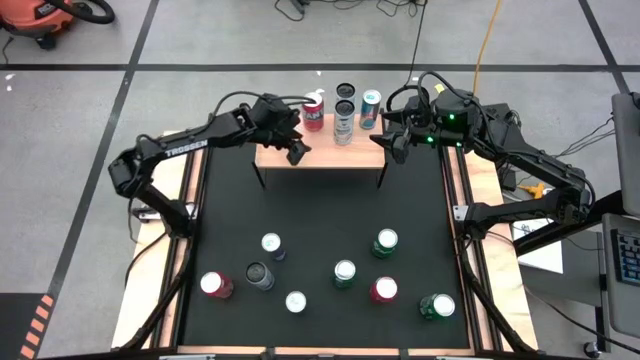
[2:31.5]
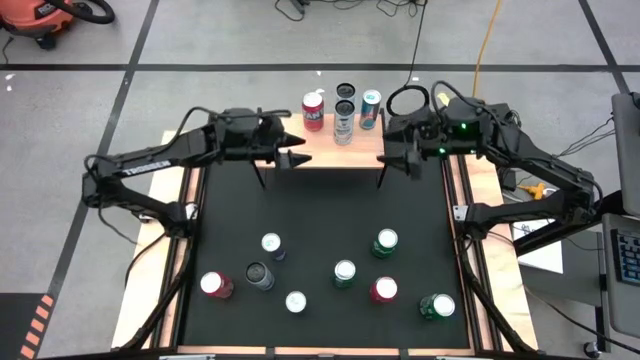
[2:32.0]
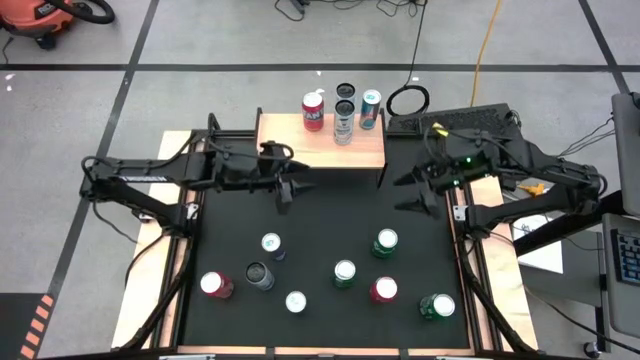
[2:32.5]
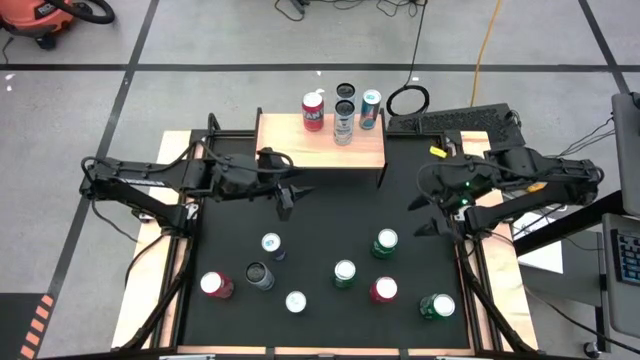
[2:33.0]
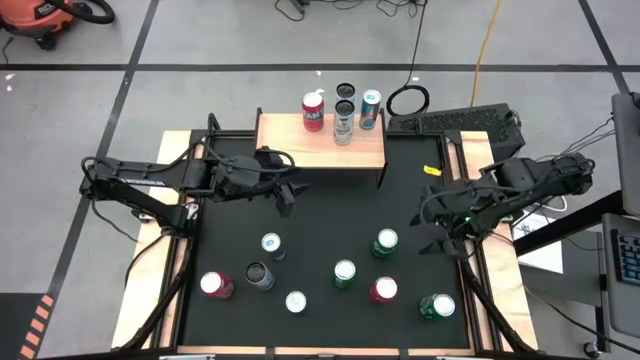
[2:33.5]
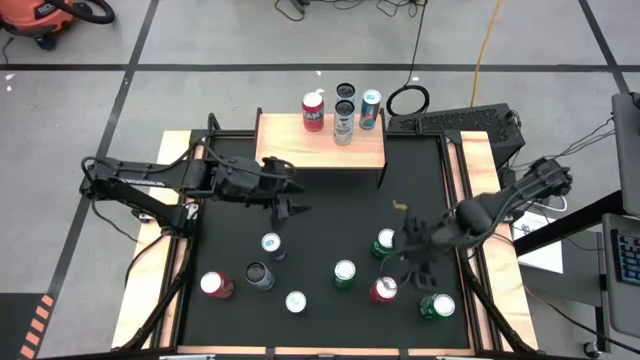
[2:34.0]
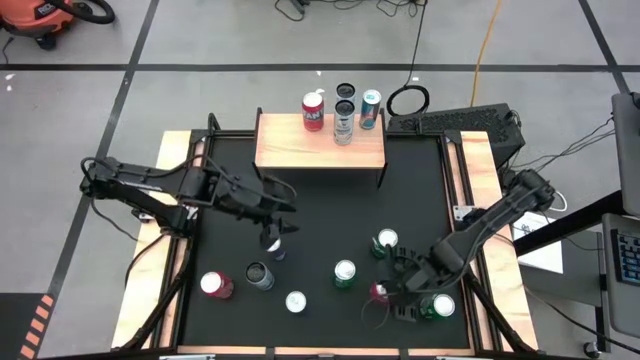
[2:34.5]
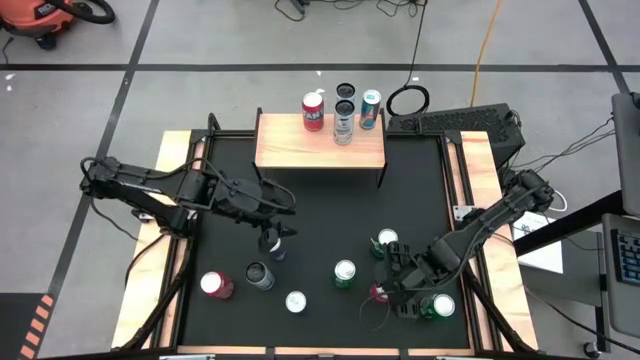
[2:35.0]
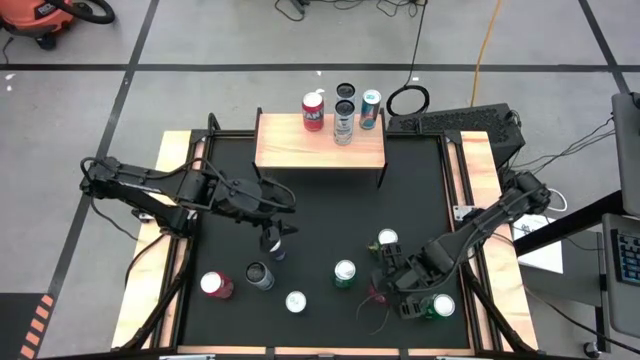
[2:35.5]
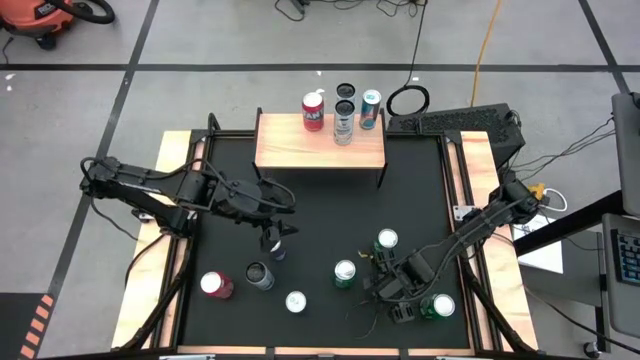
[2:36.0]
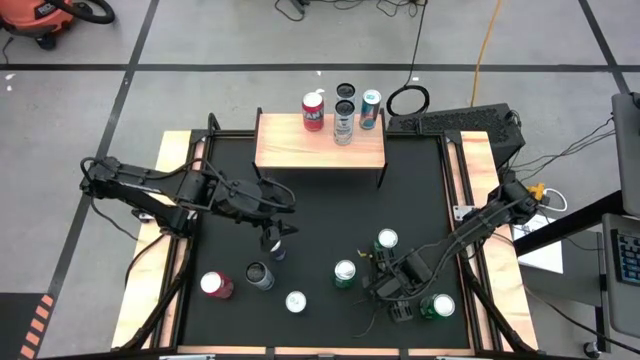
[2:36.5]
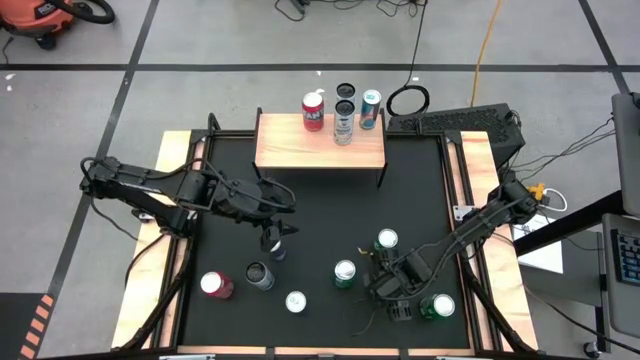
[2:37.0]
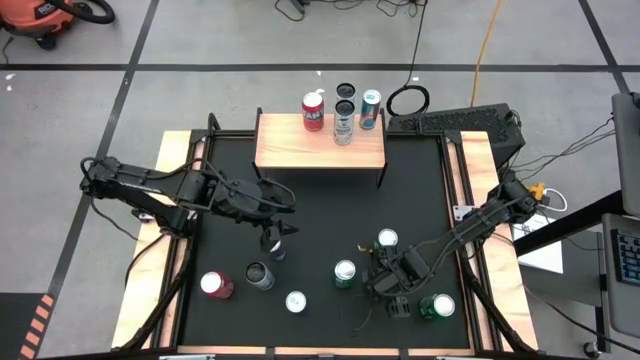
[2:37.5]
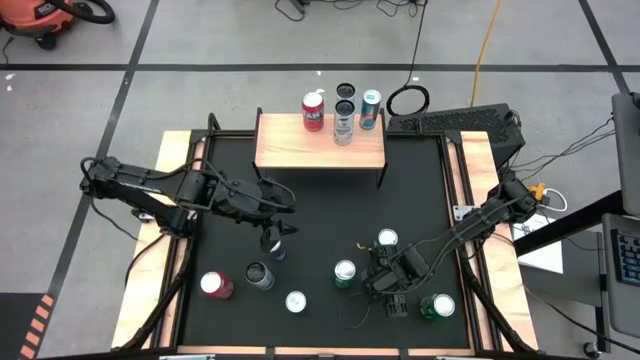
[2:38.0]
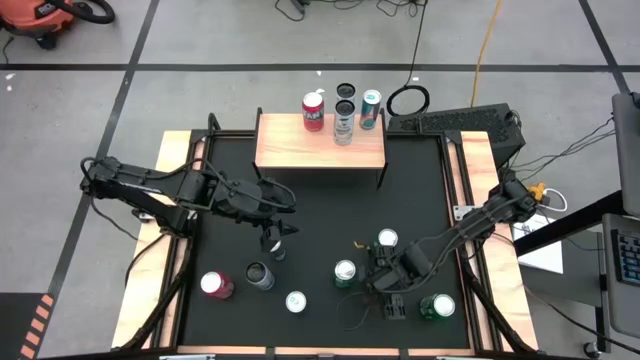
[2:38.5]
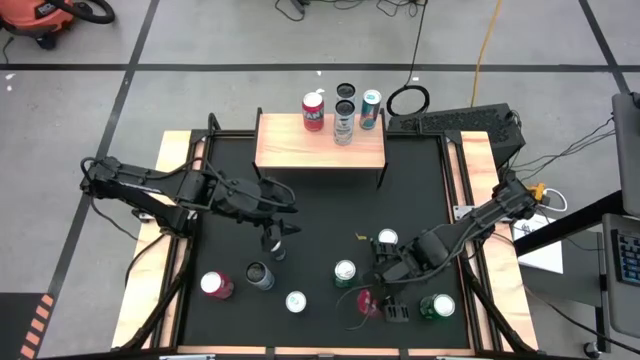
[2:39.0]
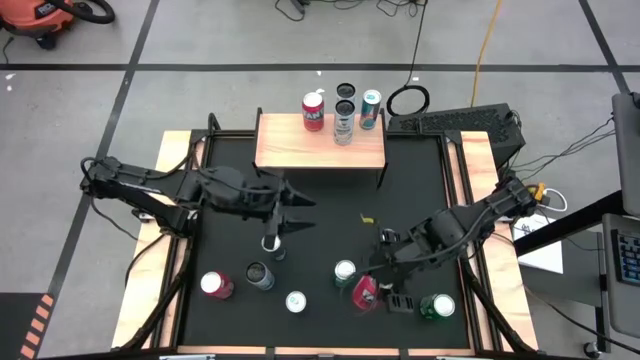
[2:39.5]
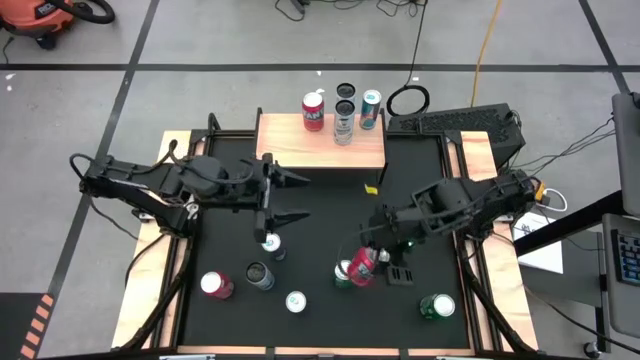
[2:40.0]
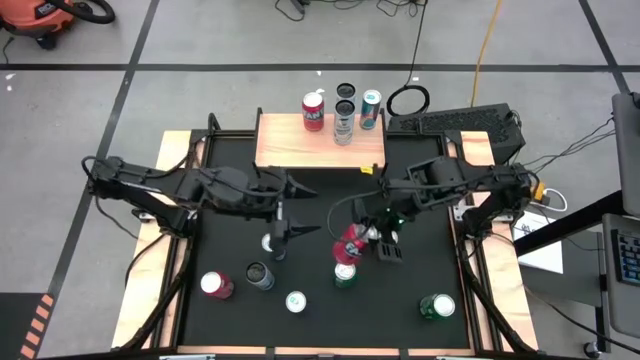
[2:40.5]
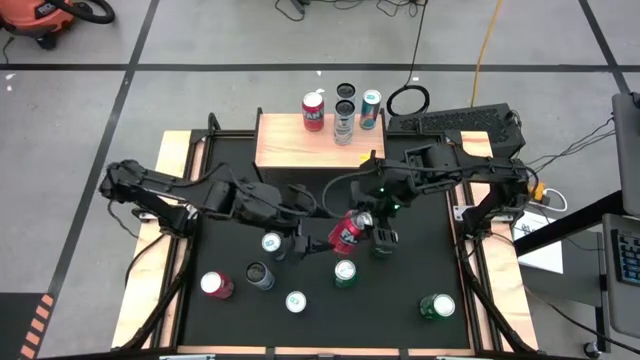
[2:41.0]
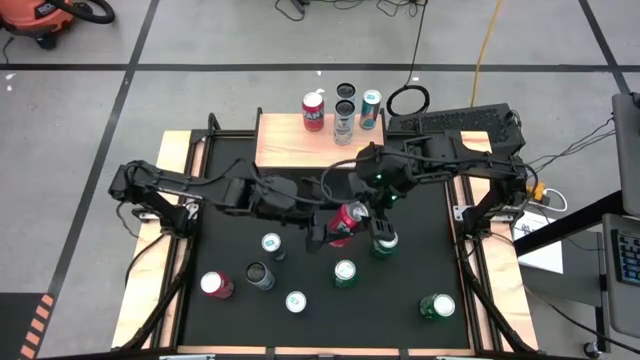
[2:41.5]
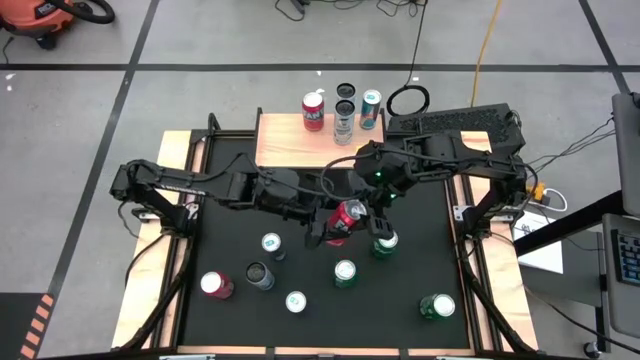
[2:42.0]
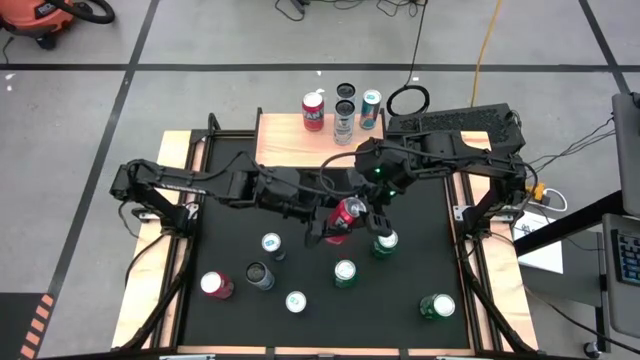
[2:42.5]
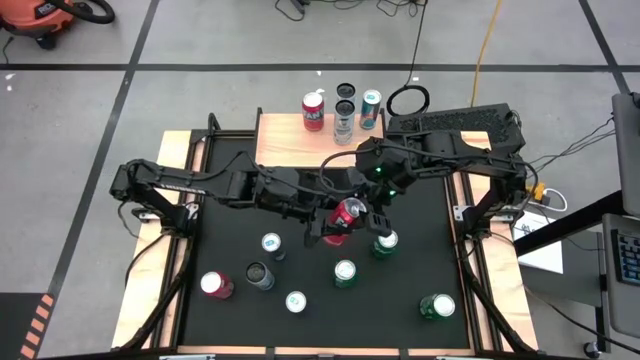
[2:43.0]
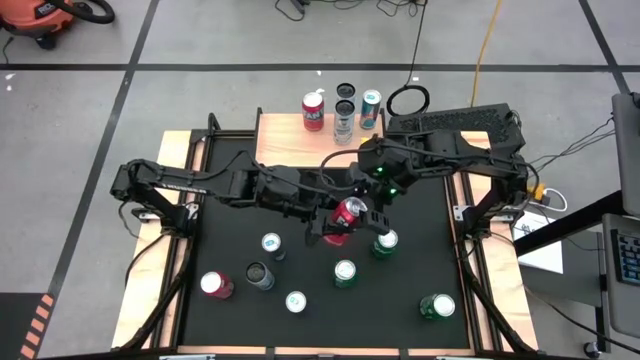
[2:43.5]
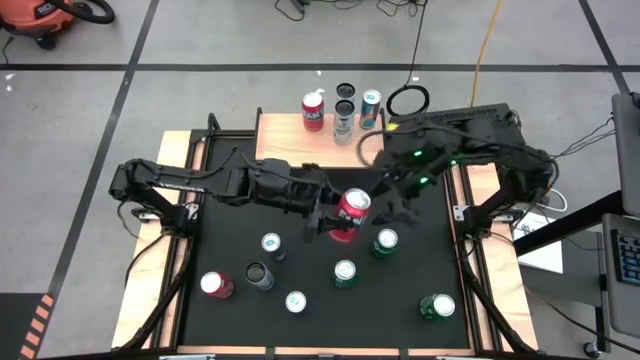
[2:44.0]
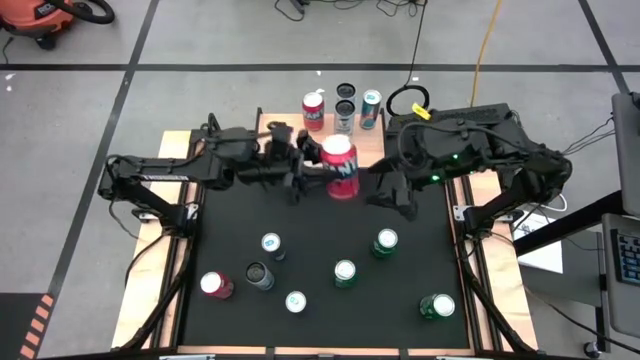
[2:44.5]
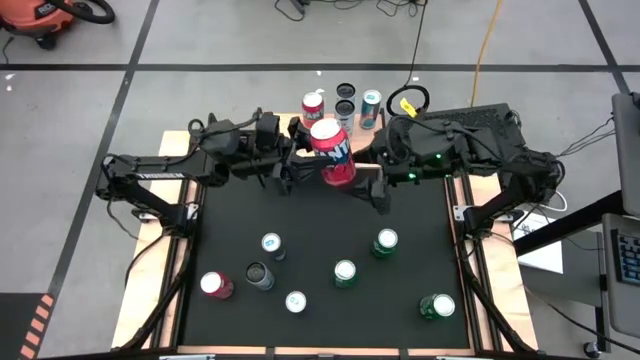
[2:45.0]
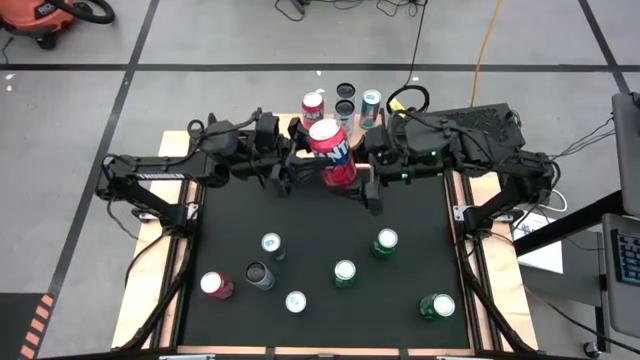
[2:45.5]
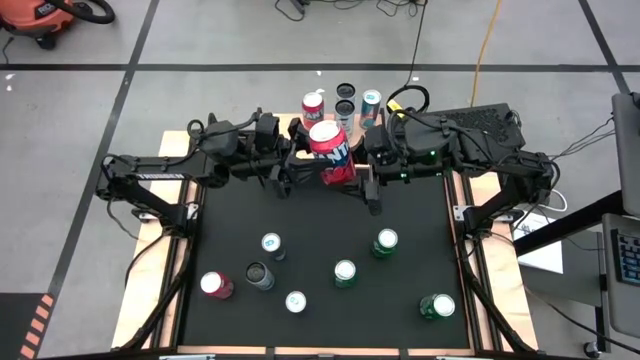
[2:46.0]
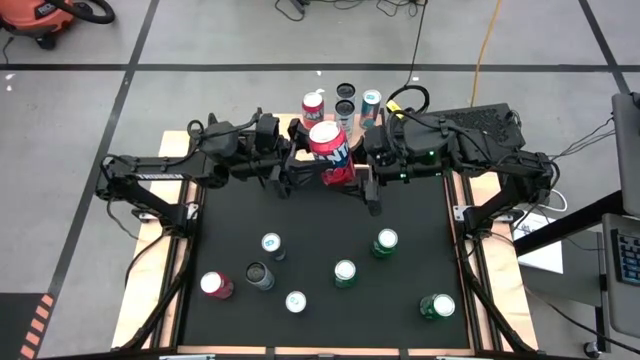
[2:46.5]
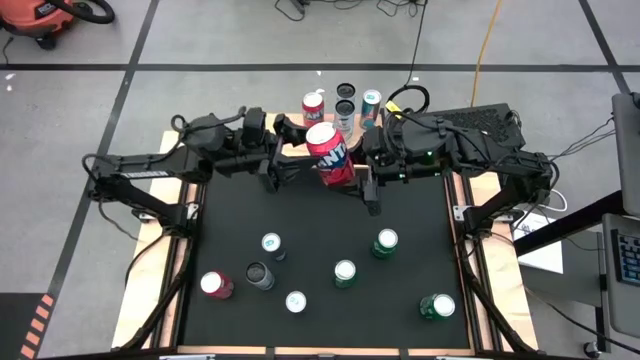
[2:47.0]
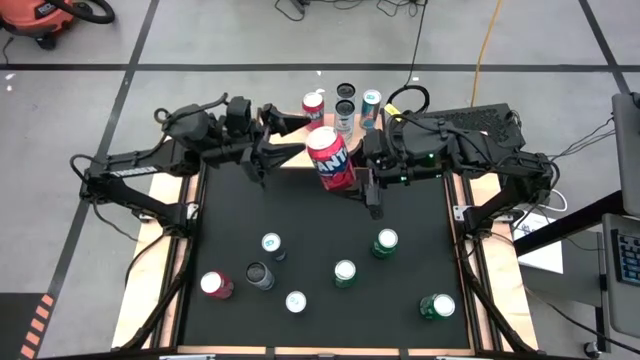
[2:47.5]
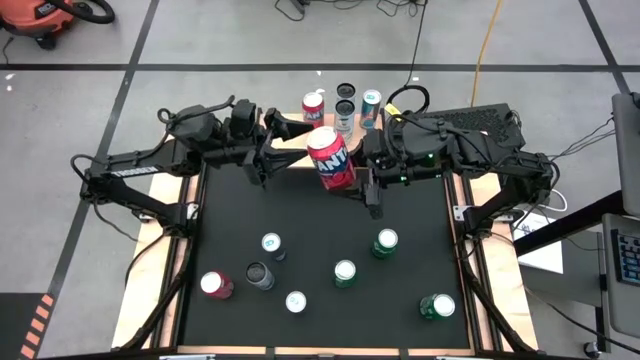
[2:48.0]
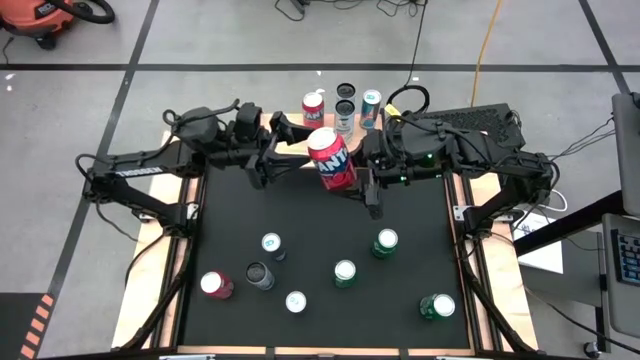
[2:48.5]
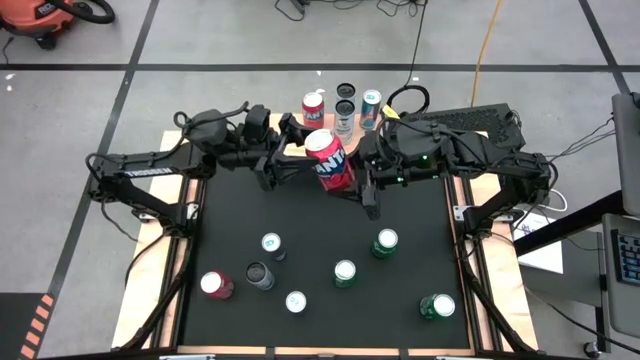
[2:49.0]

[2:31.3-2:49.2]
Task: Place canned beverage on shelf
Put the right orange soda can on the shelf aligned with the other orange soda can

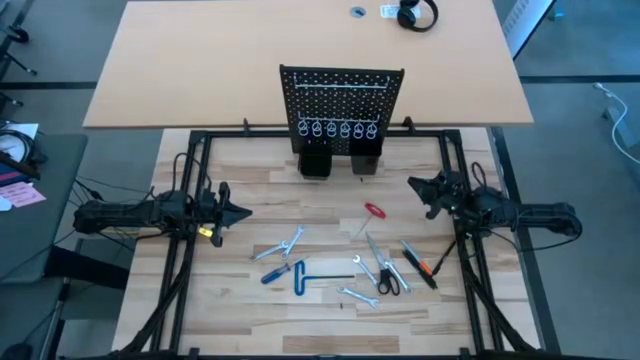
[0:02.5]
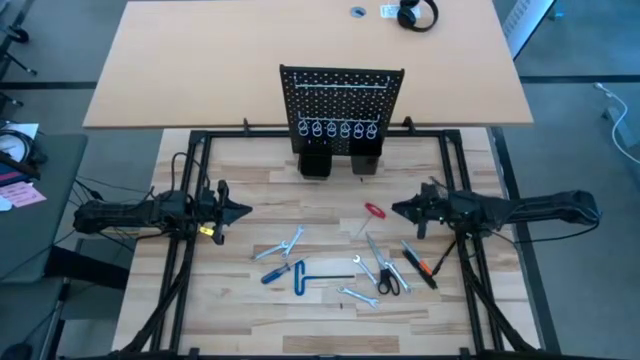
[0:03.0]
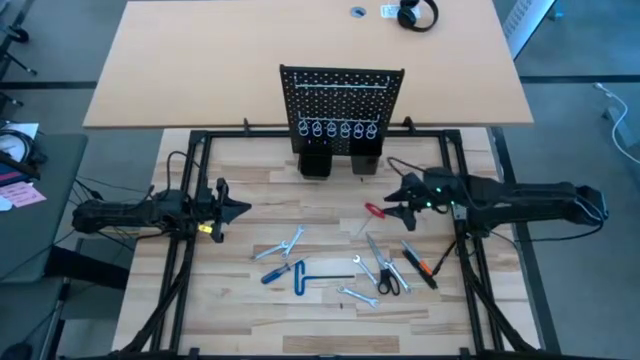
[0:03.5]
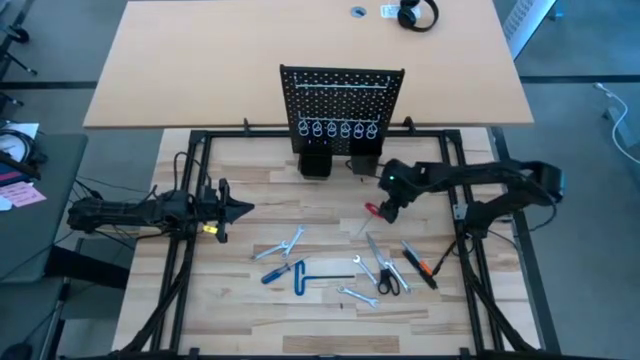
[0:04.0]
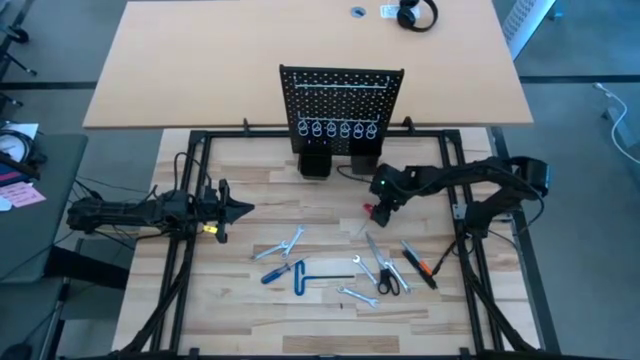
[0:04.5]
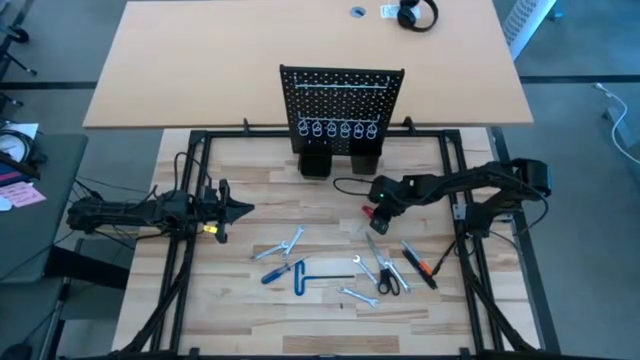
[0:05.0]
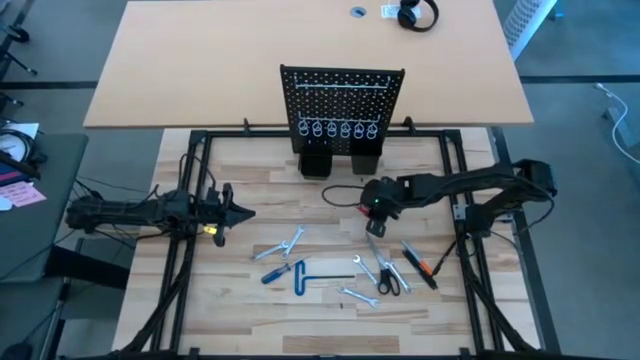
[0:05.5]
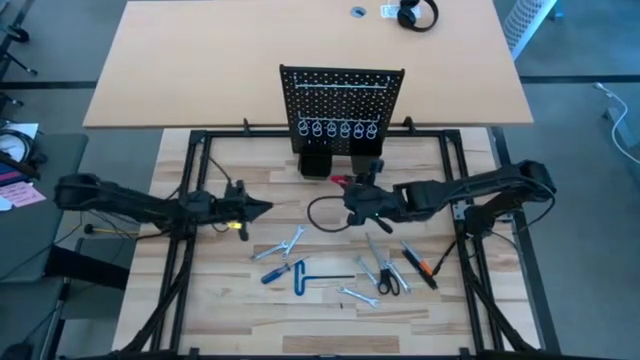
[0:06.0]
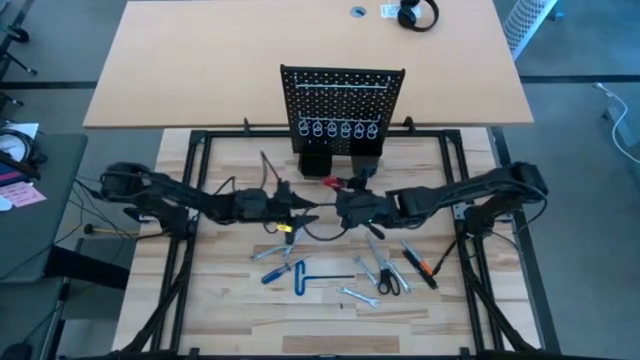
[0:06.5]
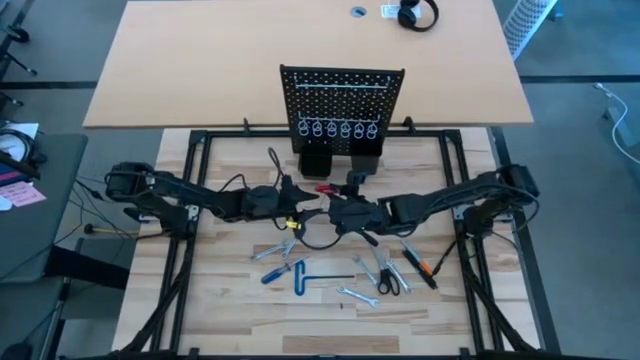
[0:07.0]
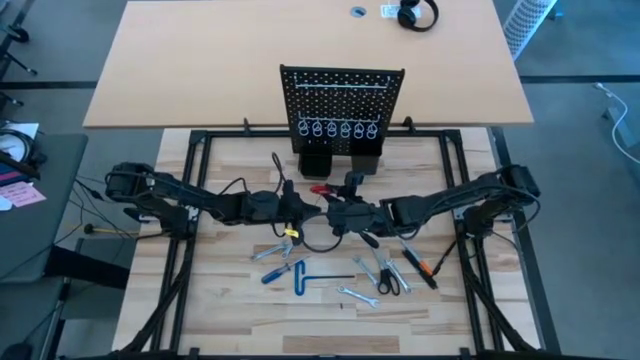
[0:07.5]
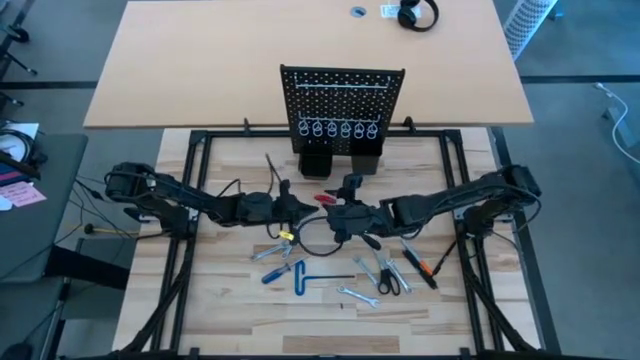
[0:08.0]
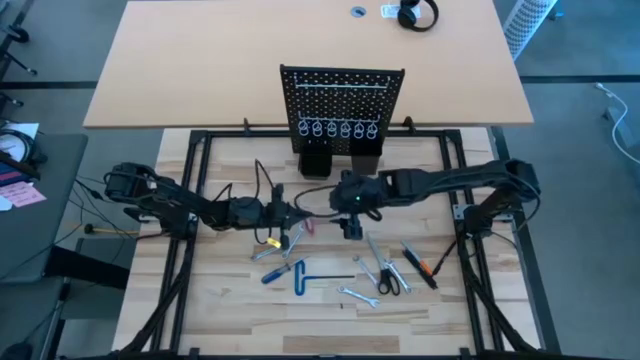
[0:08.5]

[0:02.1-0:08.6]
Task: Hang tools onto peg board
Hang the red T handle allen wrench on the pegboard
